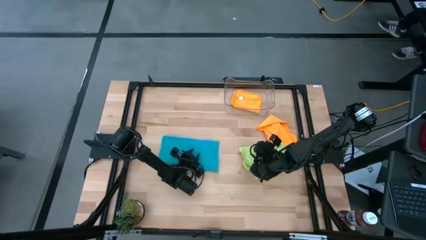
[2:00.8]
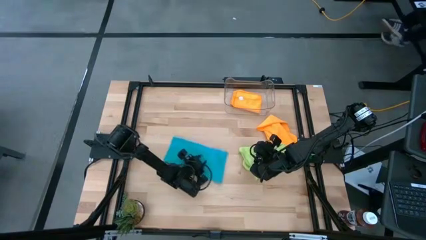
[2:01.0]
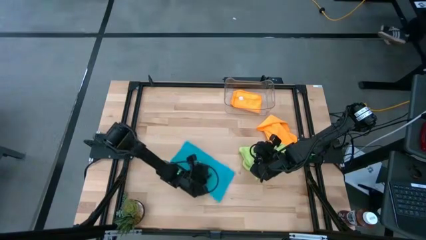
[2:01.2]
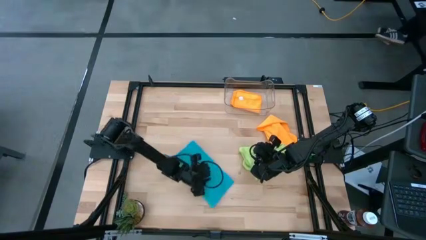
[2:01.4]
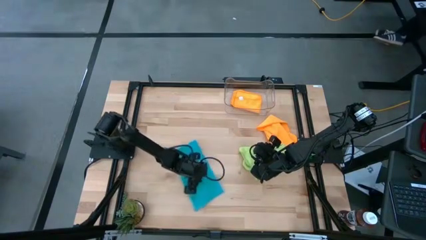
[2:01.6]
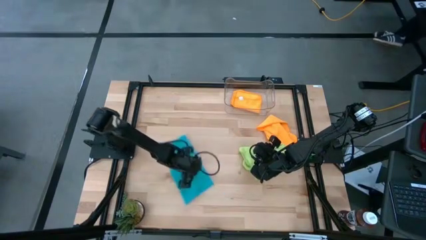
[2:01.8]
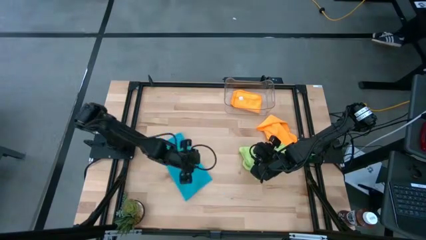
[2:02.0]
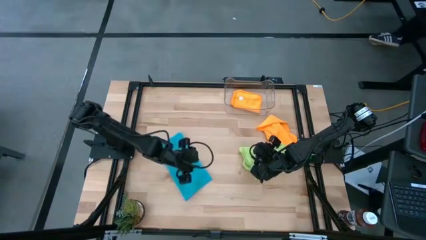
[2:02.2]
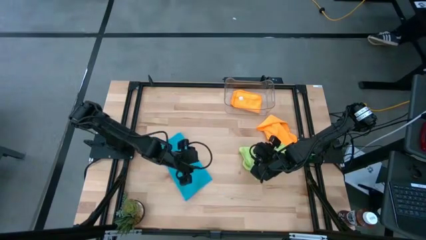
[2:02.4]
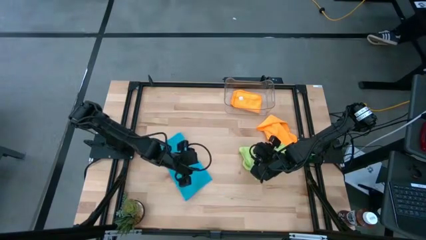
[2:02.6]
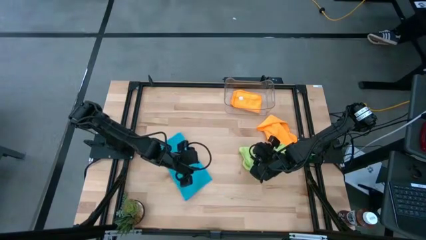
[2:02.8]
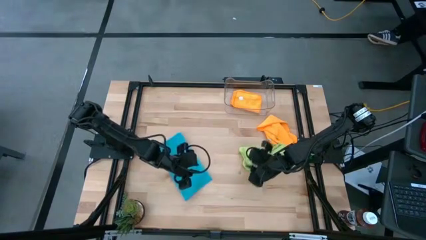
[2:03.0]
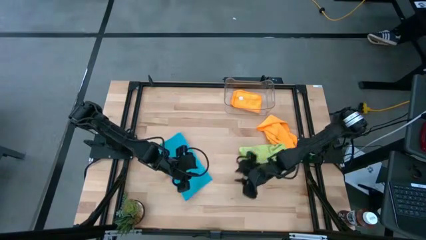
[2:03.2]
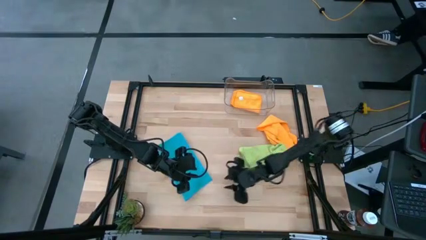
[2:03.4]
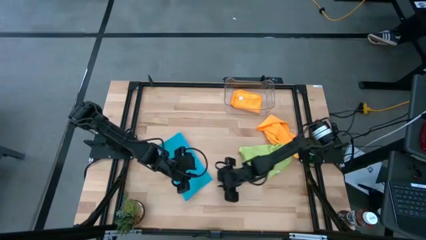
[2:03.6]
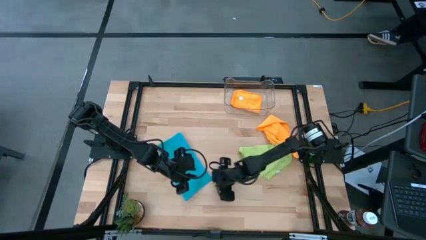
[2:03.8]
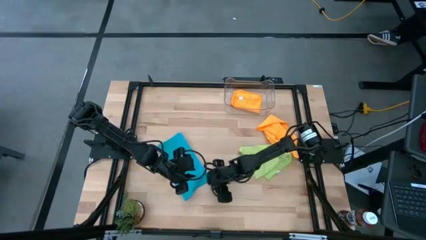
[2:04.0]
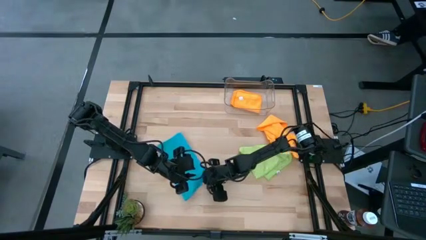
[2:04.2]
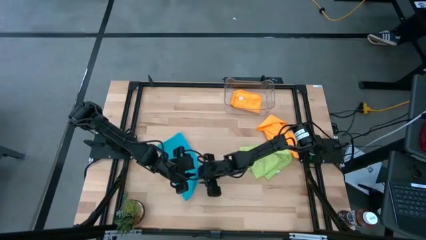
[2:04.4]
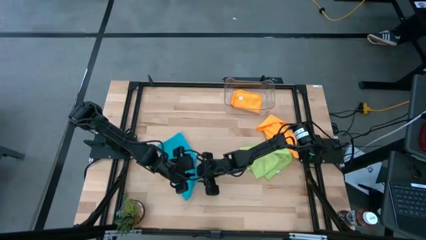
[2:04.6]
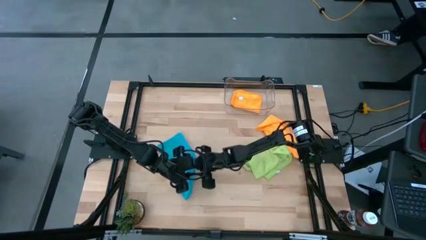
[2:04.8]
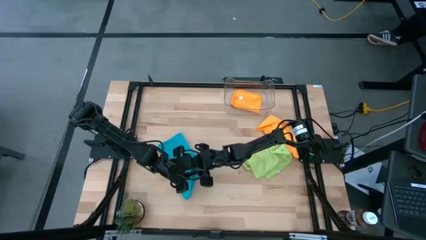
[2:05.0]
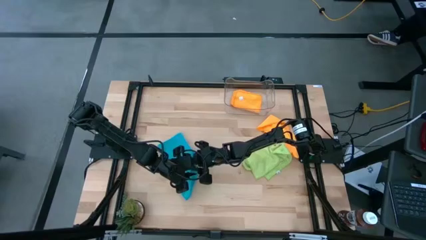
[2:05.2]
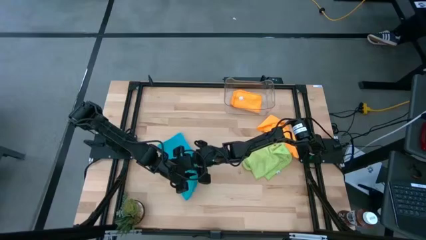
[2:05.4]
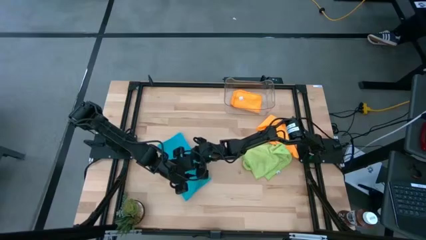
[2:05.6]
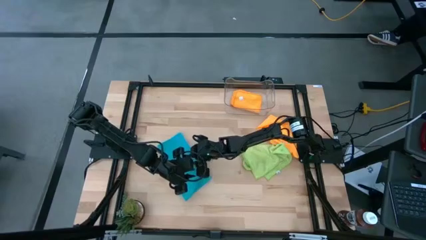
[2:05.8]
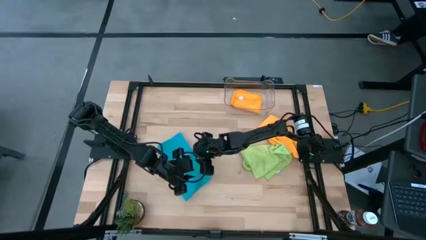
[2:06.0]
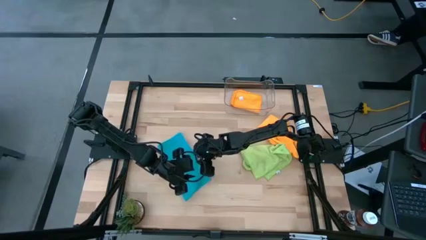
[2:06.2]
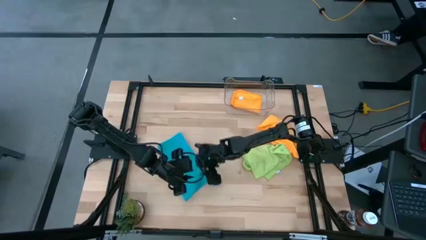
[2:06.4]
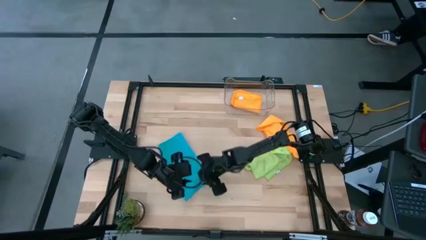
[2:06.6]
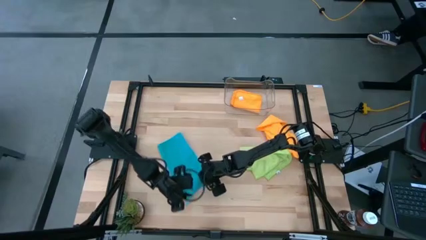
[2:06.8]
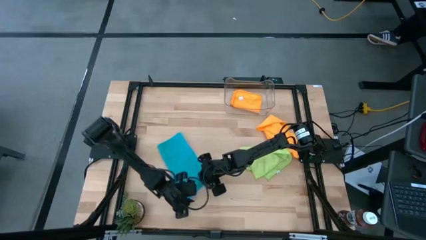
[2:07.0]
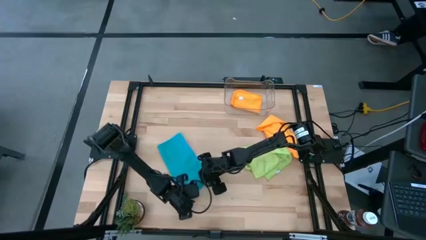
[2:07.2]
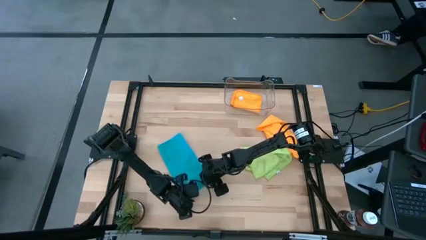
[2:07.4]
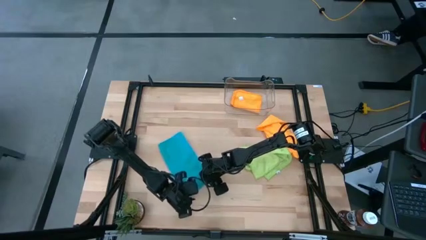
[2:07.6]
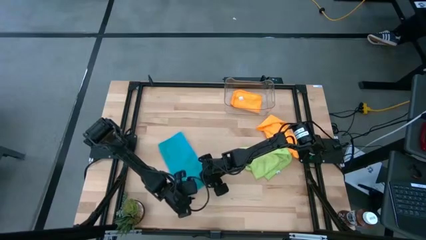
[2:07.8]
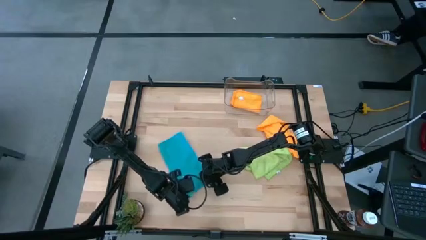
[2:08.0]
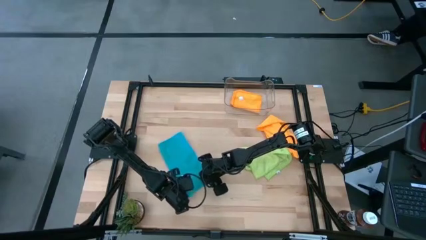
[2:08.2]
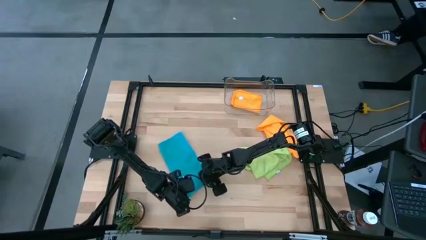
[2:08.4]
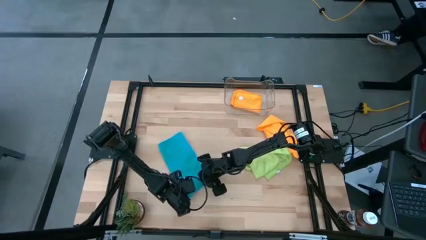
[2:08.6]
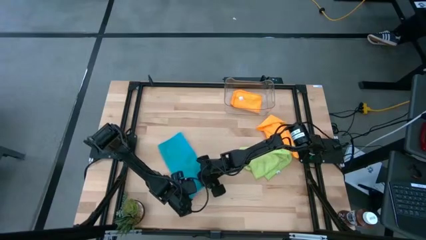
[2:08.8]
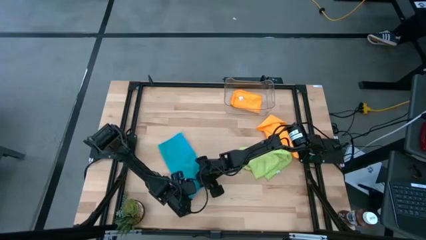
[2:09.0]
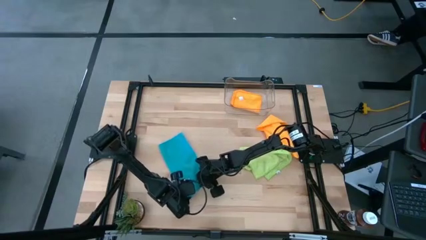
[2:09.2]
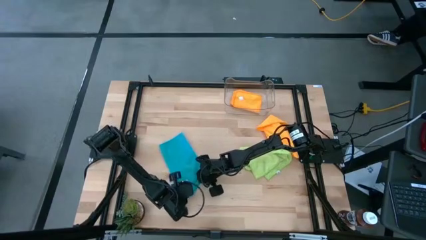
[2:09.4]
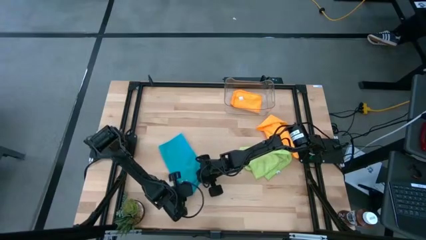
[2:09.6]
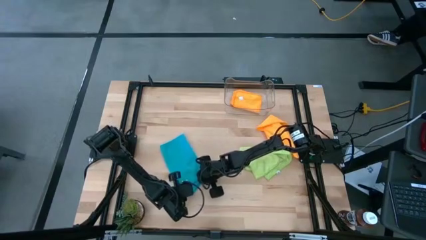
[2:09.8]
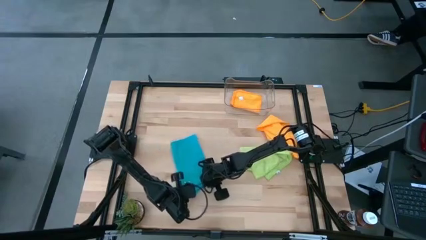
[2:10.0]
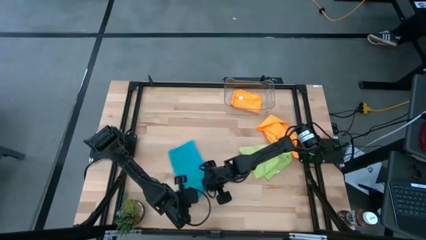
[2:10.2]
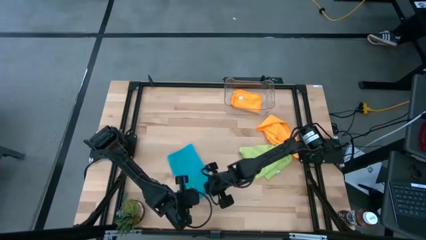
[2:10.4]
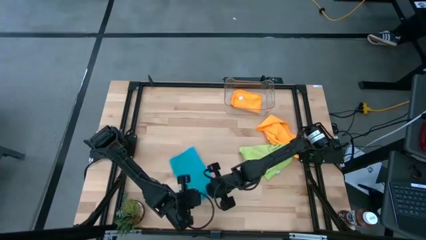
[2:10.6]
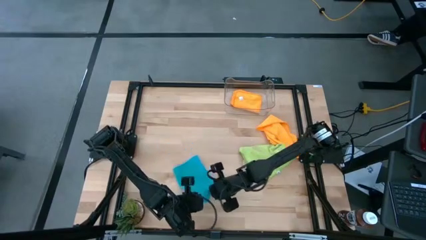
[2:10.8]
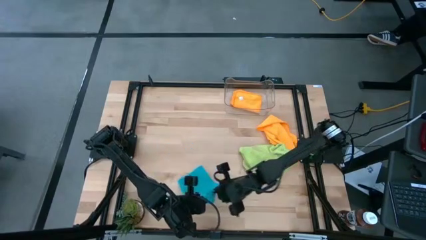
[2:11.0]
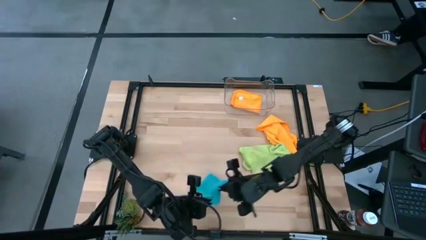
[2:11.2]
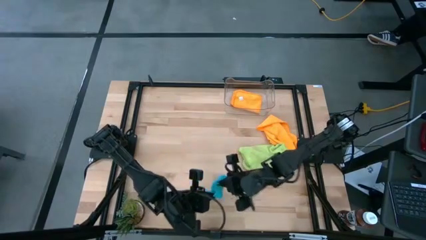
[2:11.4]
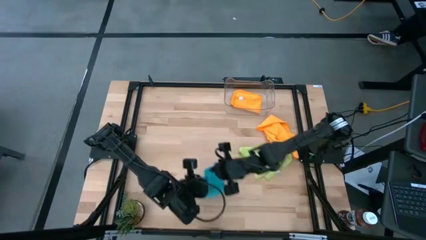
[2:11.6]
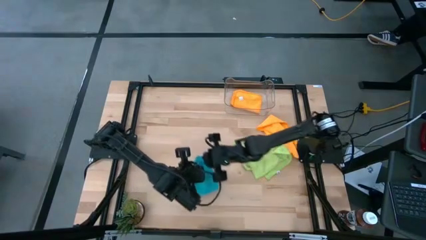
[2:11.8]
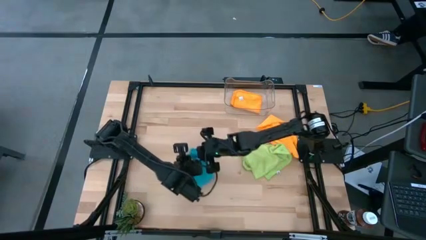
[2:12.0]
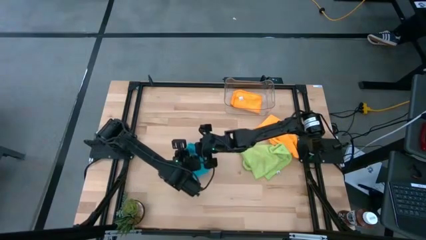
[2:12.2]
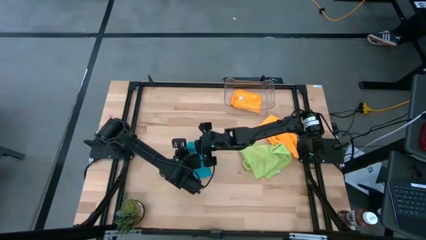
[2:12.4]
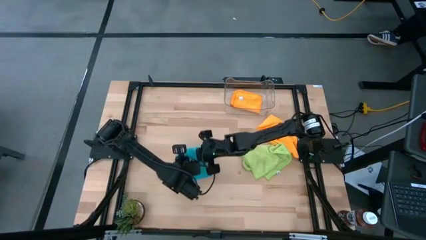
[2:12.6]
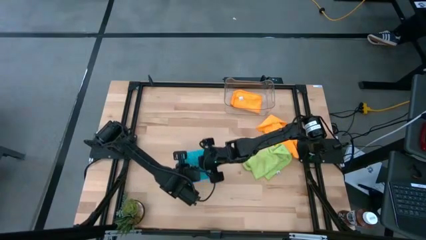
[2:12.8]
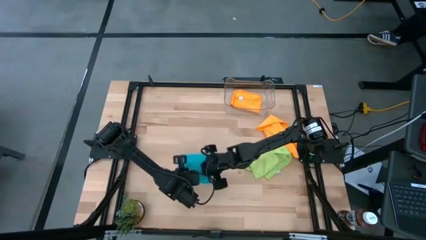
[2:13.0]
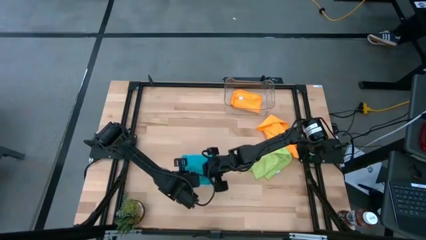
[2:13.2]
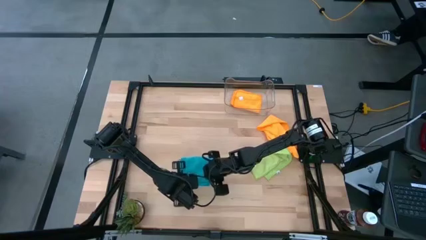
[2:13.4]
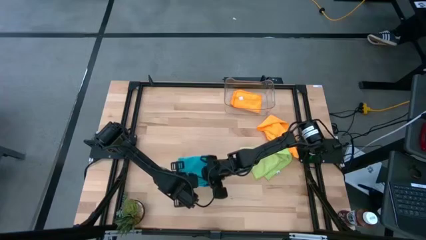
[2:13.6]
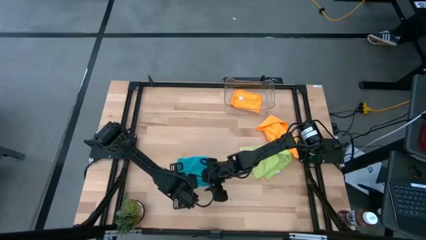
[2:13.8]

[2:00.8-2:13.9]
Task: Fold microfiber towels
Fold the blue microfiber cloth
